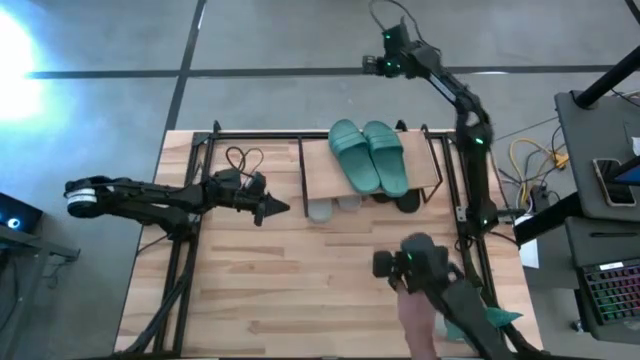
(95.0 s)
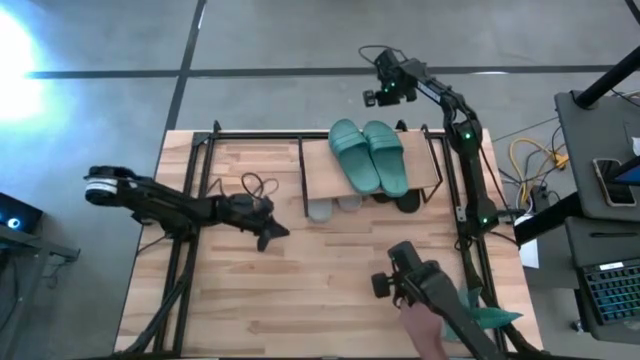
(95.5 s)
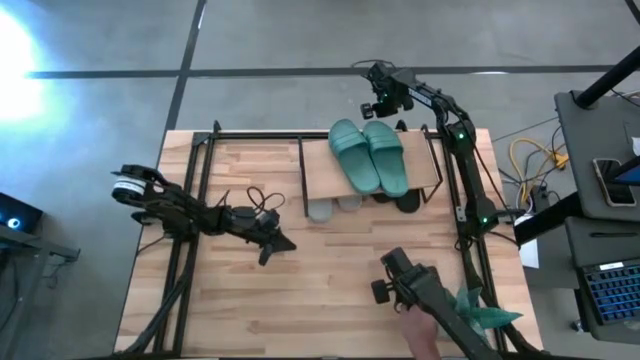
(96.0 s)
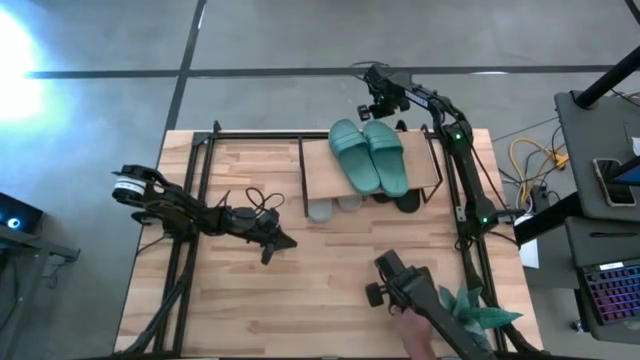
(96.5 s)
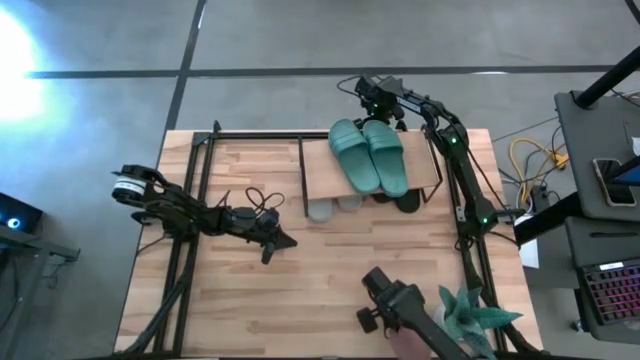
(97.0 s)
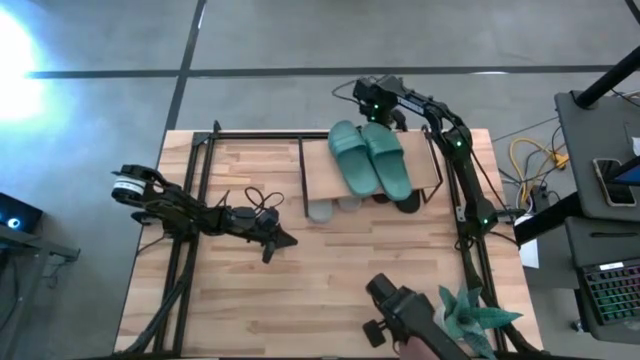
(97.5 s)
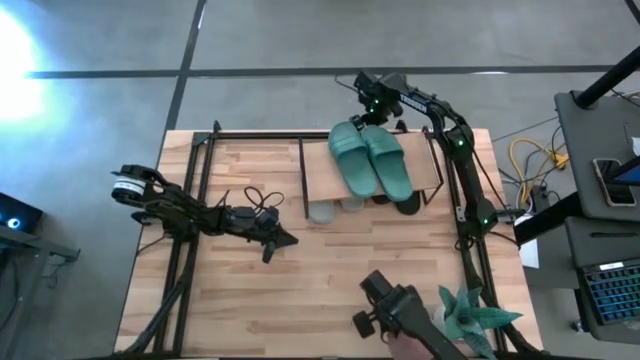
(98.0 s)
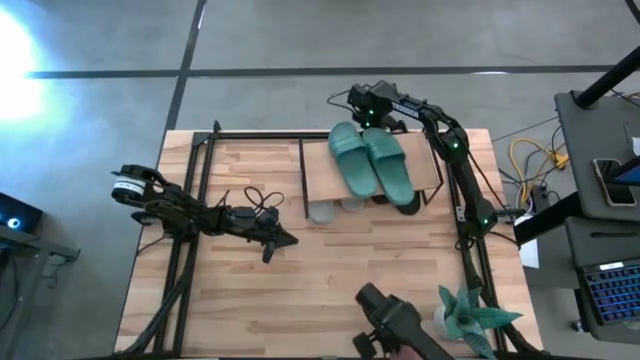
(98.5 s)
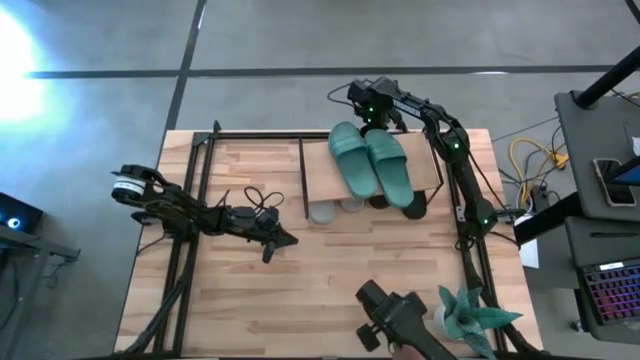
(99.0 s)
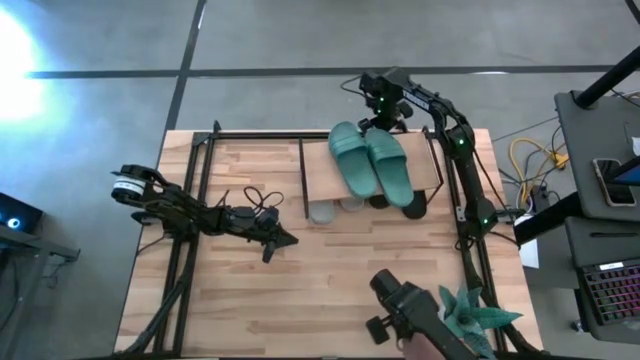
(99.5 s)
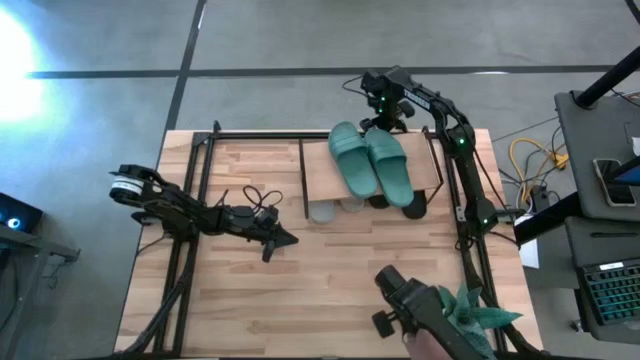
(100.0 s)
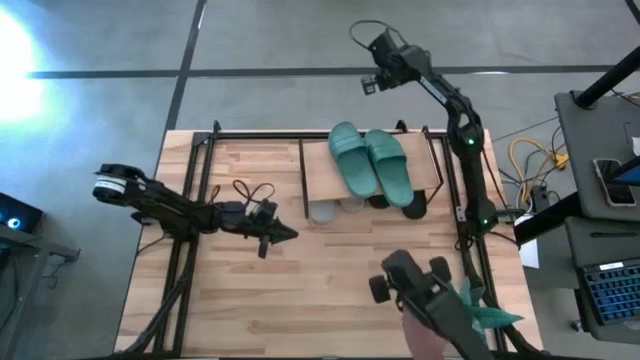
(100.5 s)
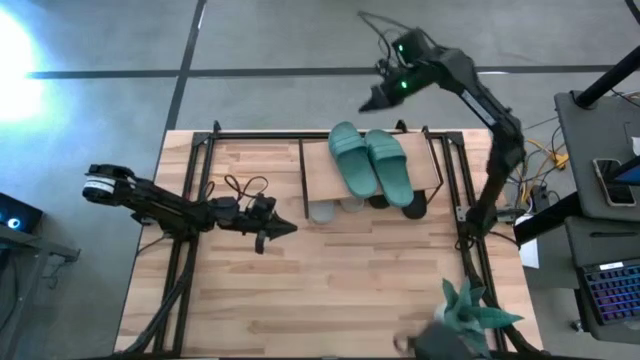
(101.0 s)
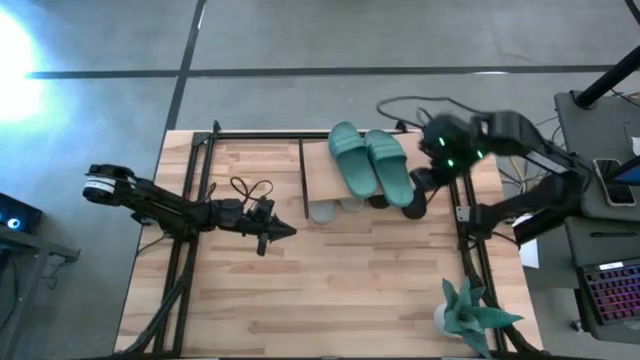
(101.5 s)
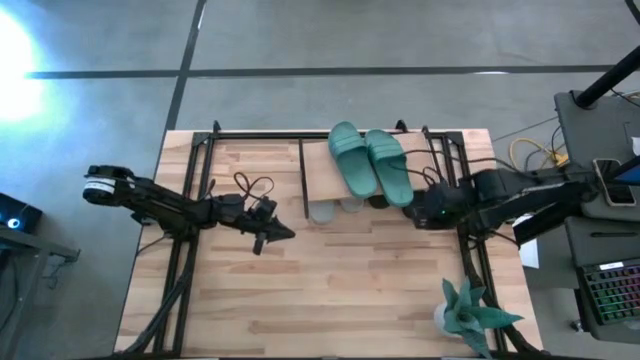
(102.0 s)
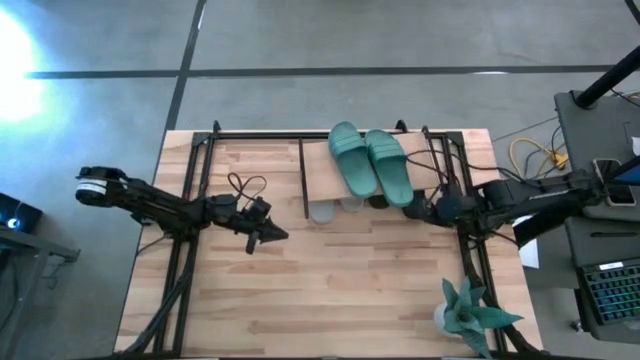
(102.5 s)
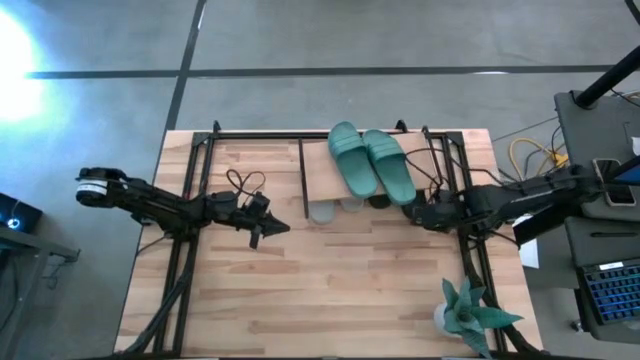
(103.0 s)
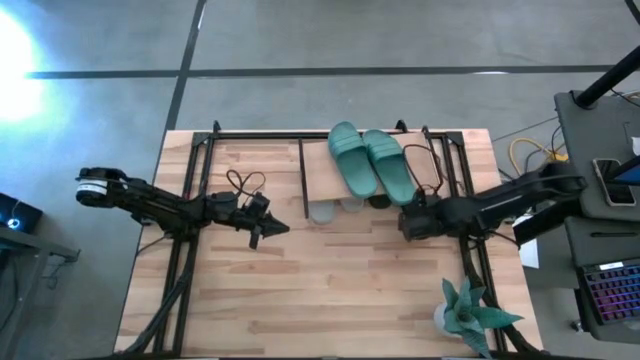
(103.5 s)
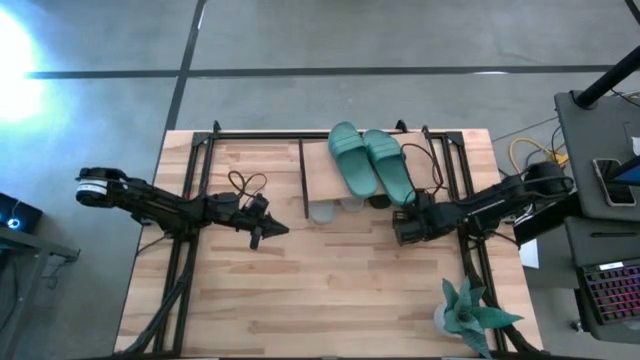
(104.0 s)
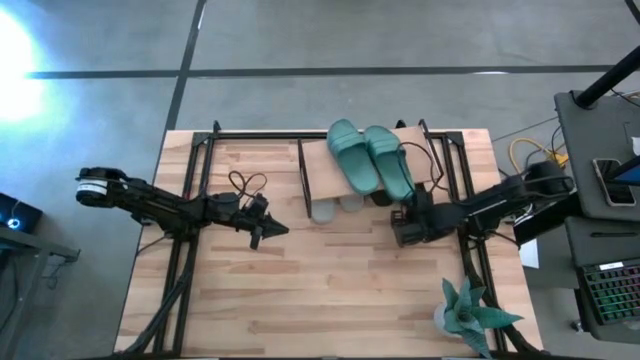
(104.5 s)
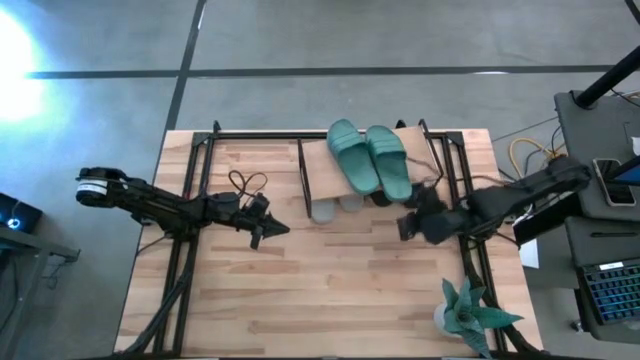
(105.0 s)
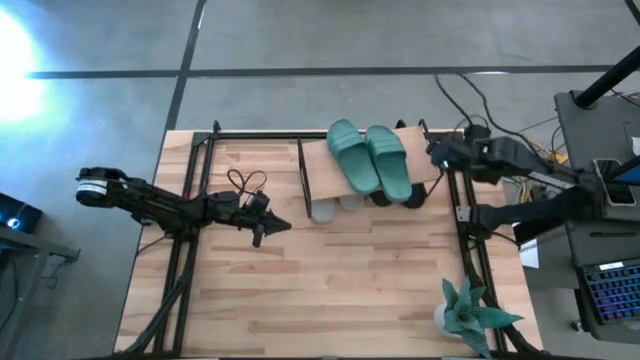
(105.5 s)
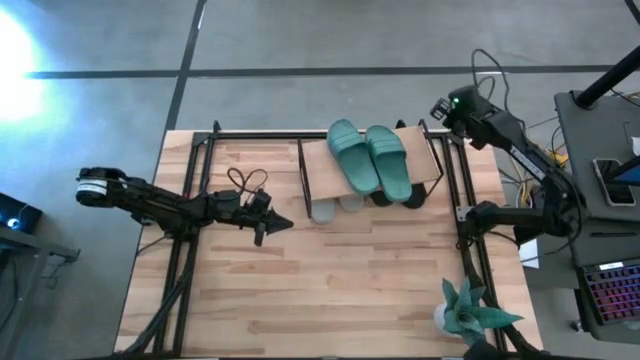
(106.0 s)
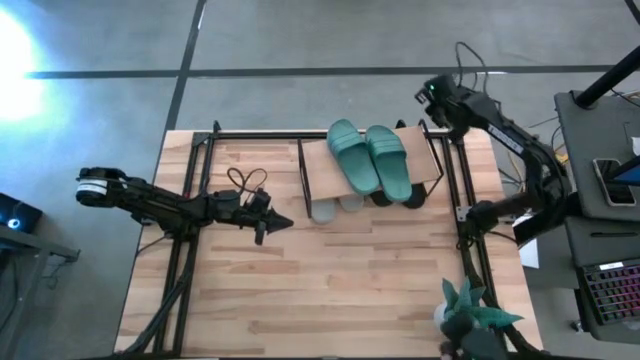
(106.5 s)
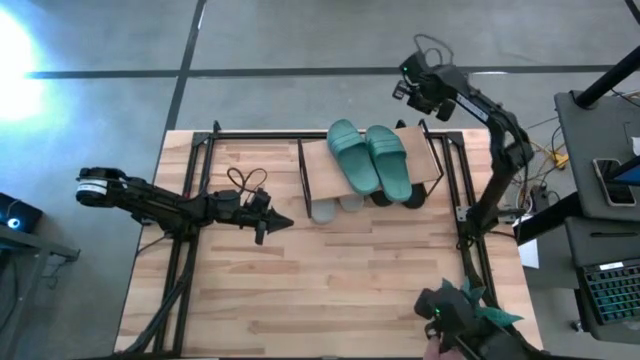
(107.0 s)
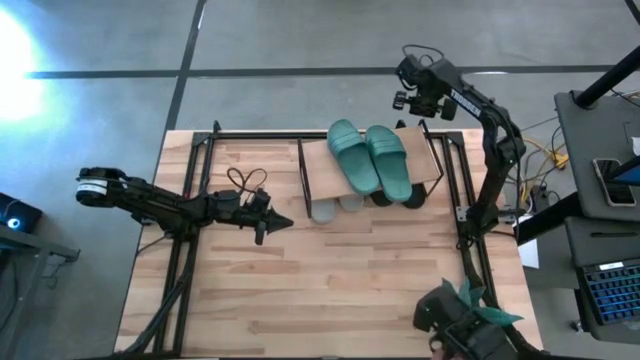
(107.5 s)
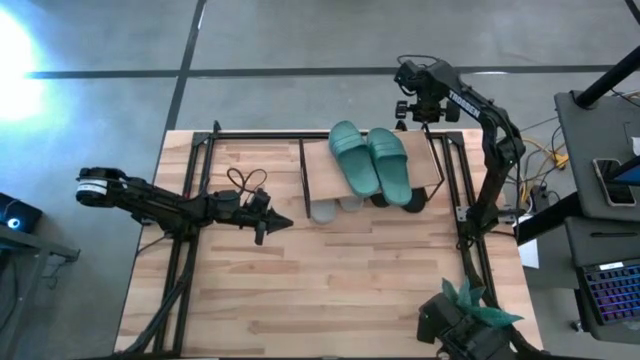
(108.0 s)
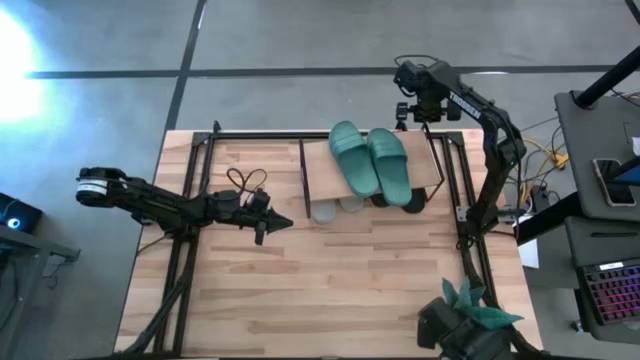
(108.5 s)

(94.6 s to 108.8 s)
Task: Pick and place slides into the shelf
Adjust the slides under the shelf

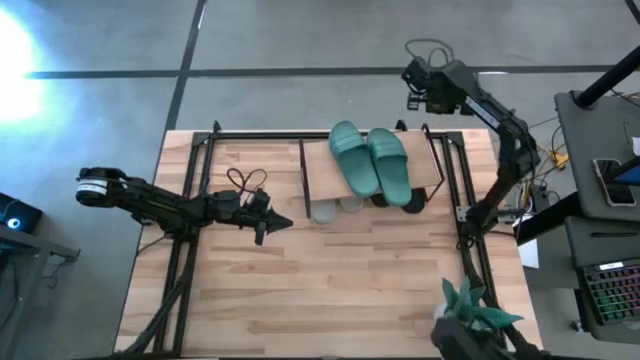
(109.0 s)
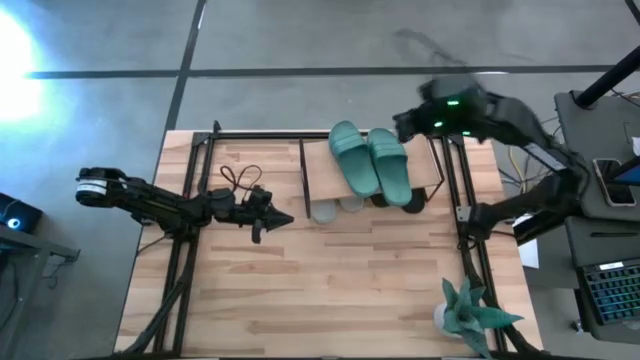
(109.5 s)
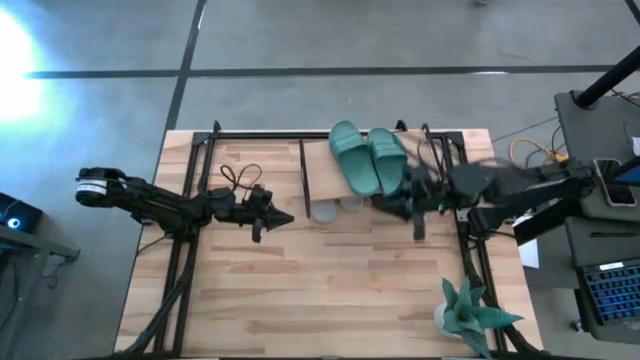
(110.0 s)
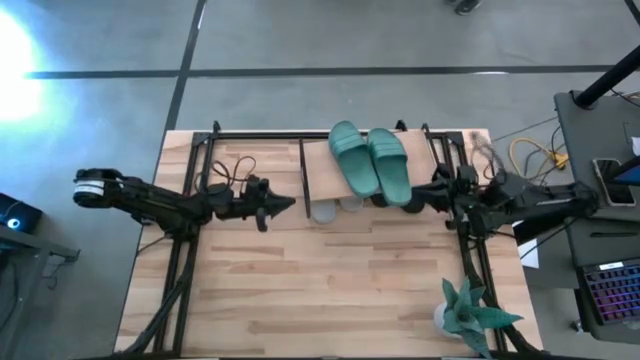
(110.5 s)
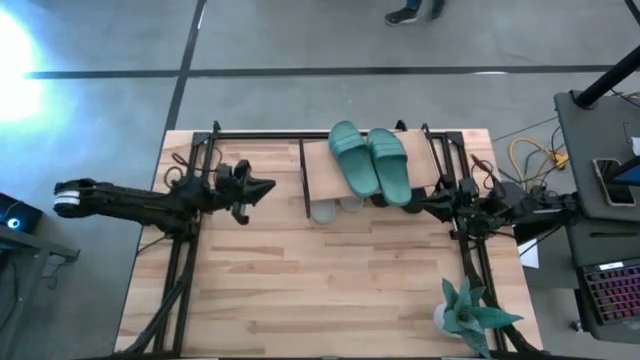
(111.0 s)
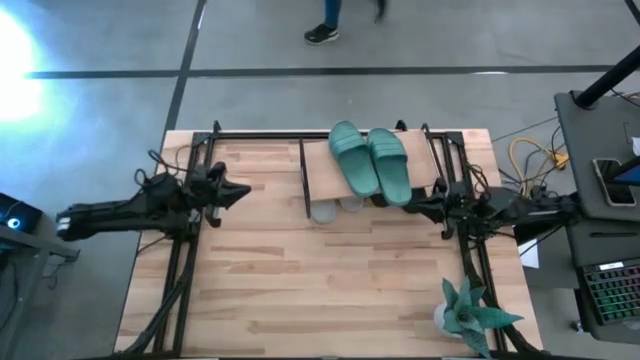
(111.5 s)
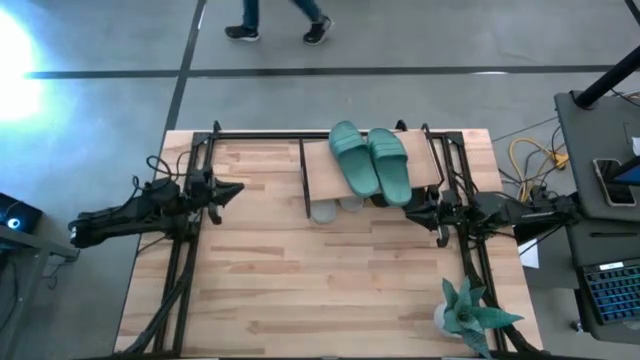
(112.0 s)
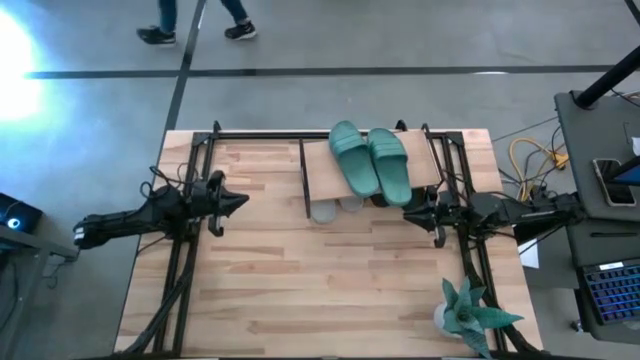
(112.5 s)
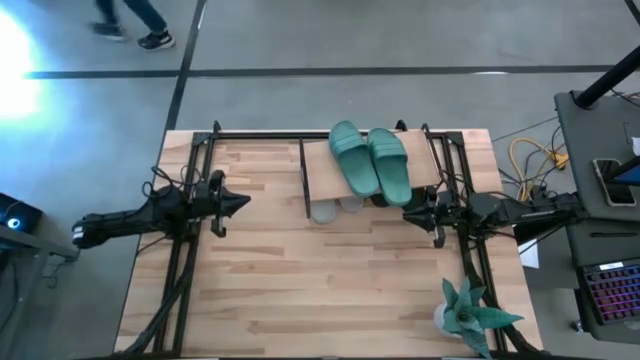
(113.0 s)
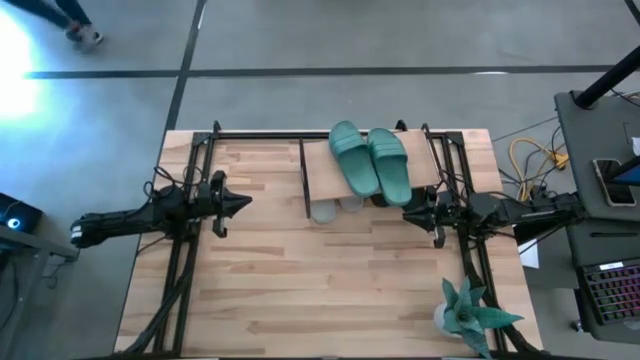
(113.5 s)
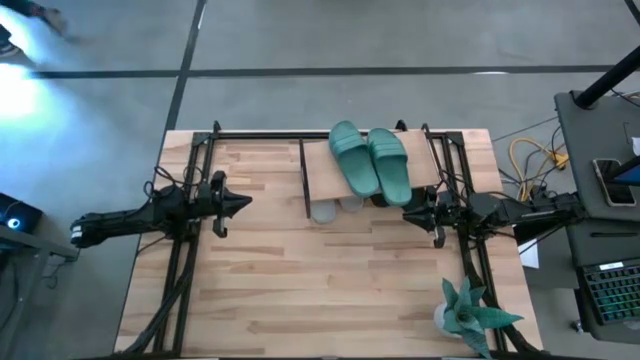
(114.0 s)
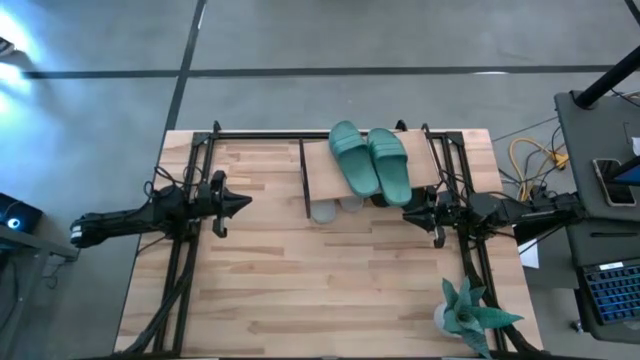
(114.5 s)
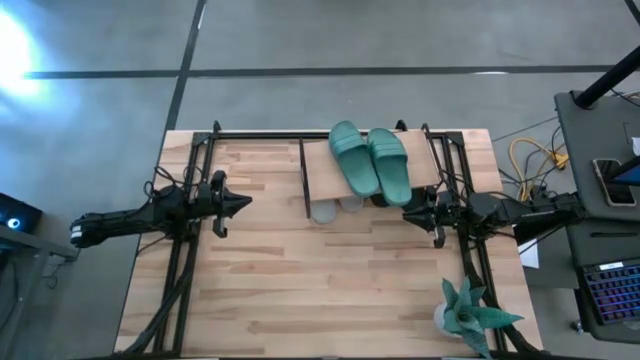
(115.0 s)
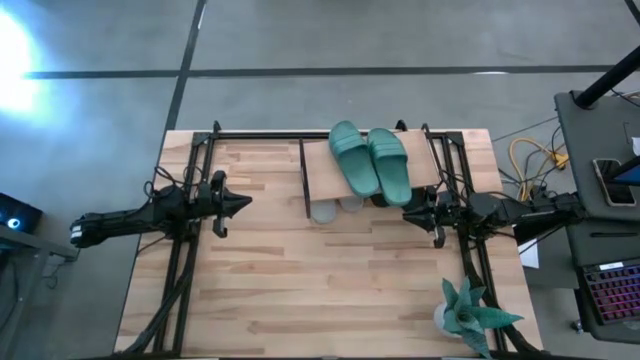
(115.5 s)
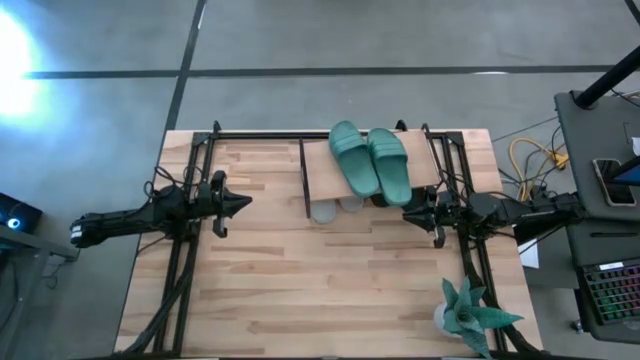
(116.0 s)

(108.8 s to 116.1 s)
Return to Home Position
